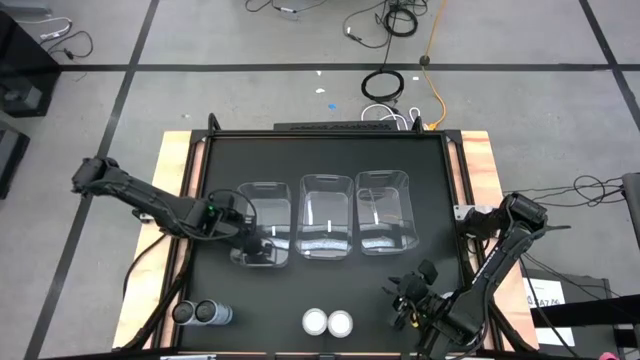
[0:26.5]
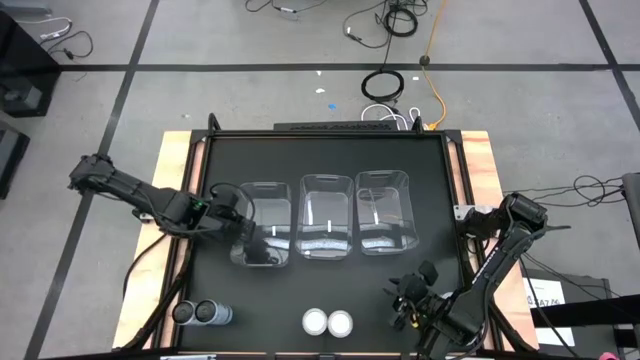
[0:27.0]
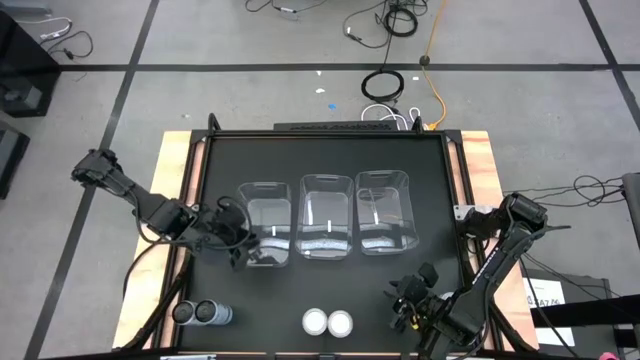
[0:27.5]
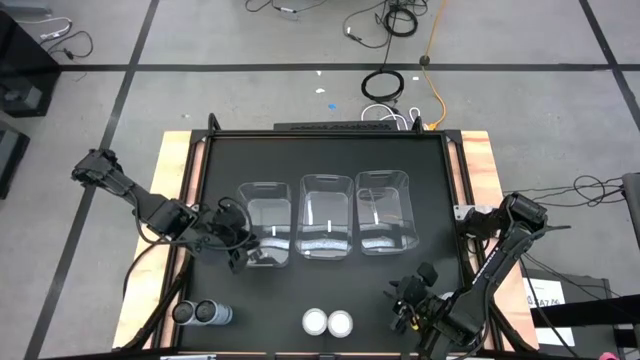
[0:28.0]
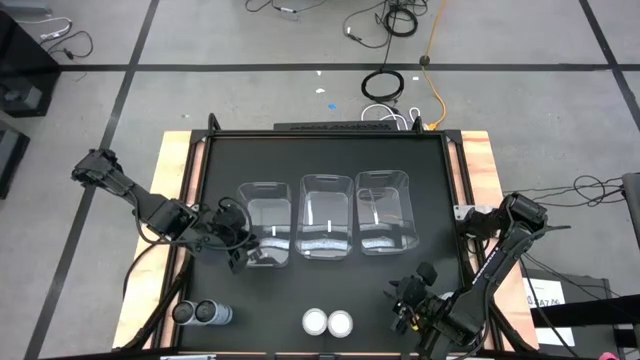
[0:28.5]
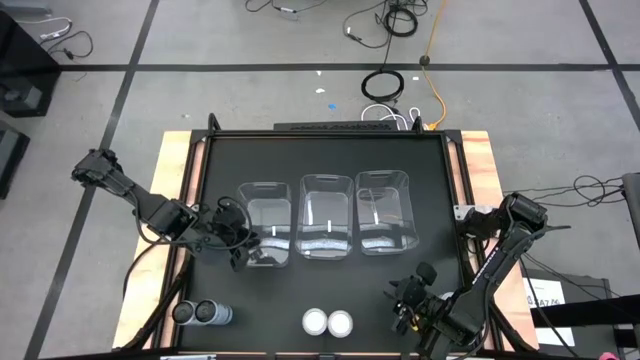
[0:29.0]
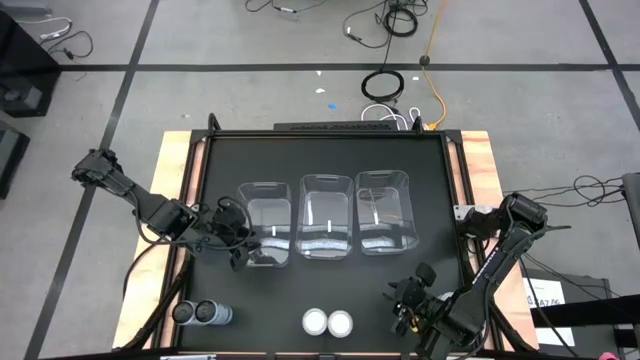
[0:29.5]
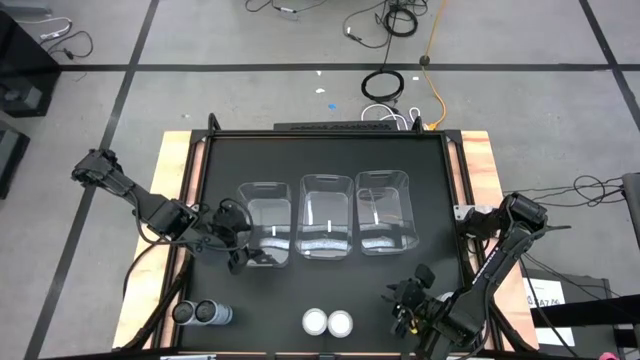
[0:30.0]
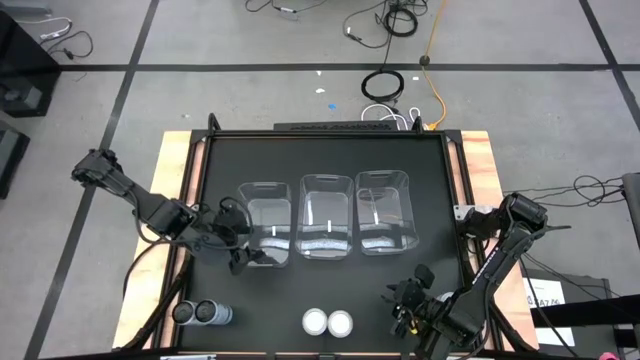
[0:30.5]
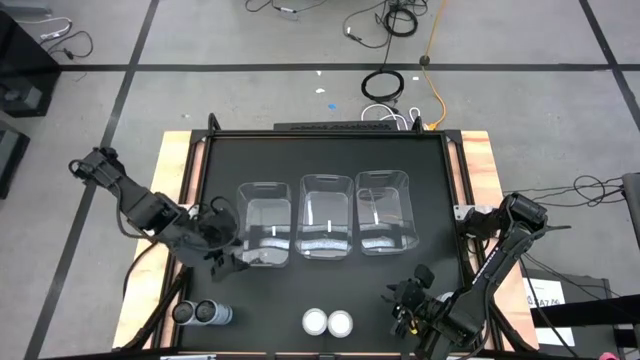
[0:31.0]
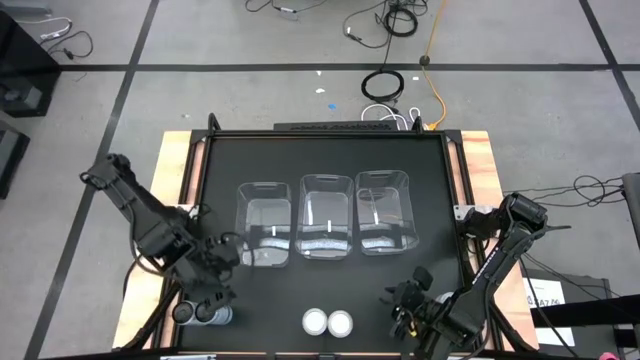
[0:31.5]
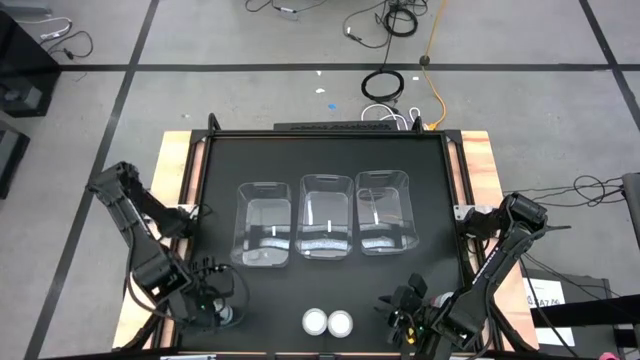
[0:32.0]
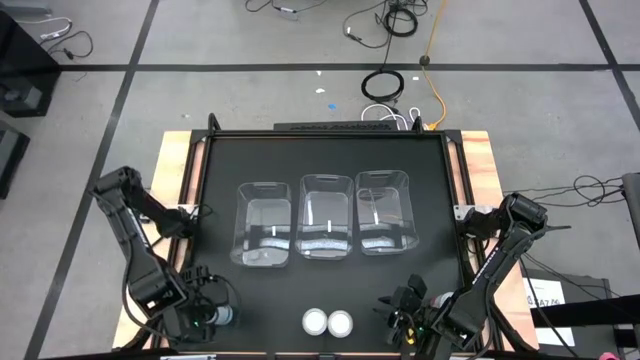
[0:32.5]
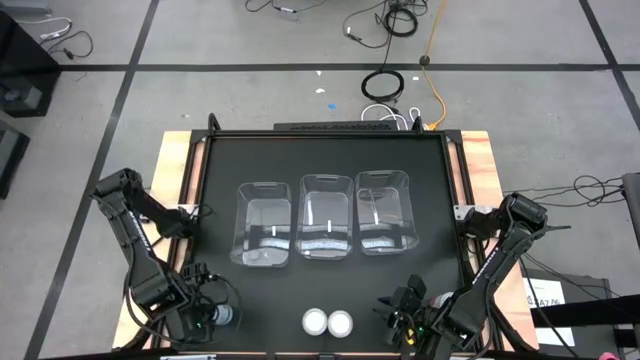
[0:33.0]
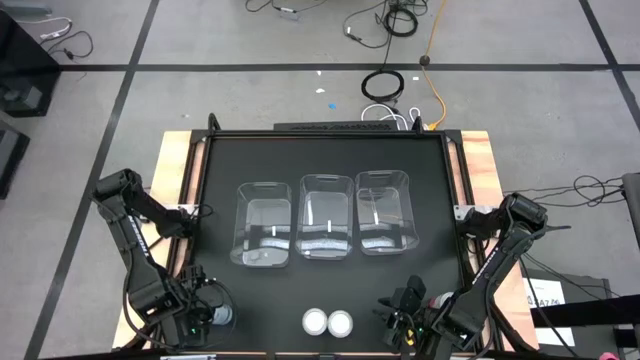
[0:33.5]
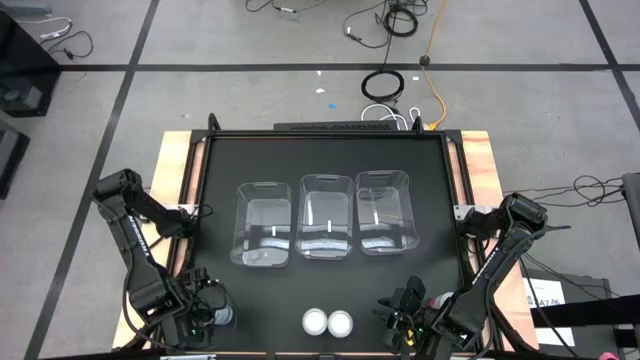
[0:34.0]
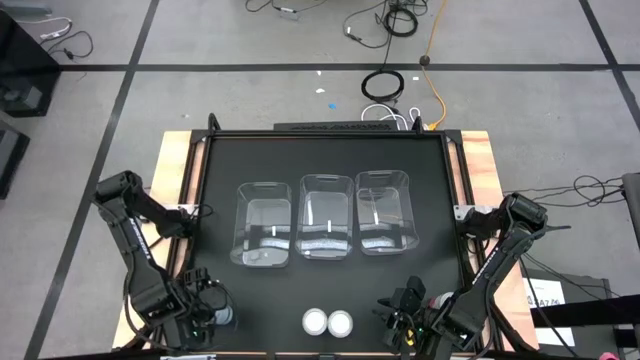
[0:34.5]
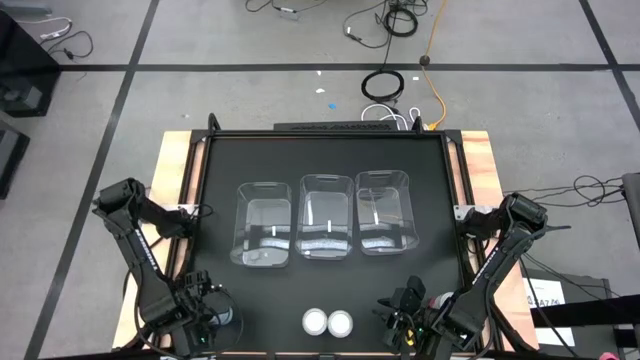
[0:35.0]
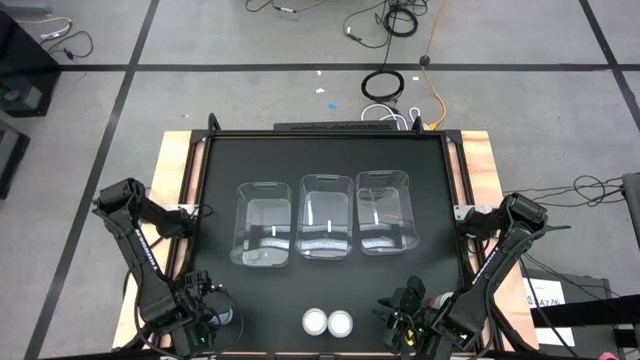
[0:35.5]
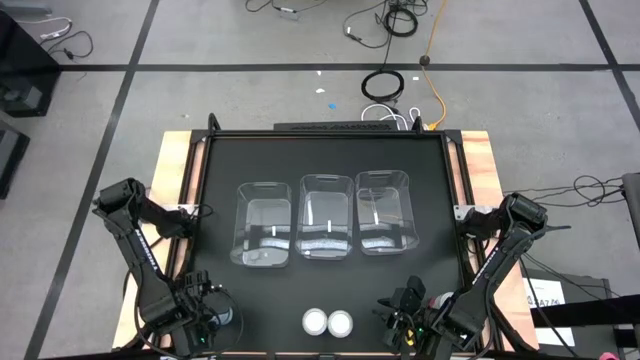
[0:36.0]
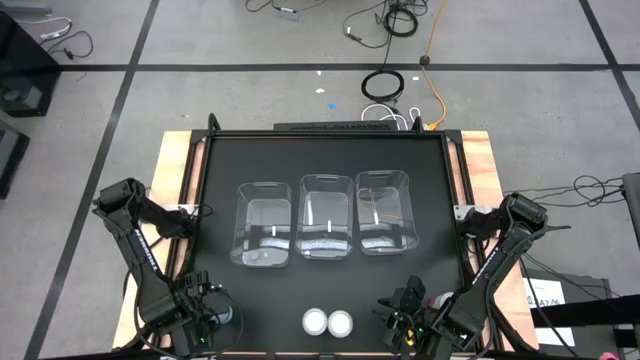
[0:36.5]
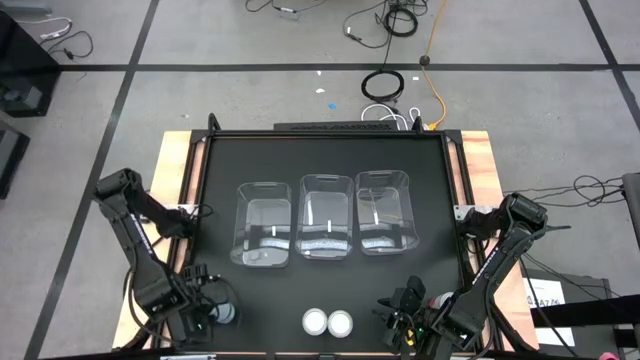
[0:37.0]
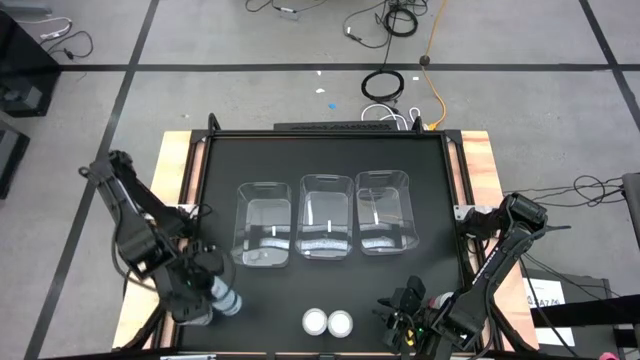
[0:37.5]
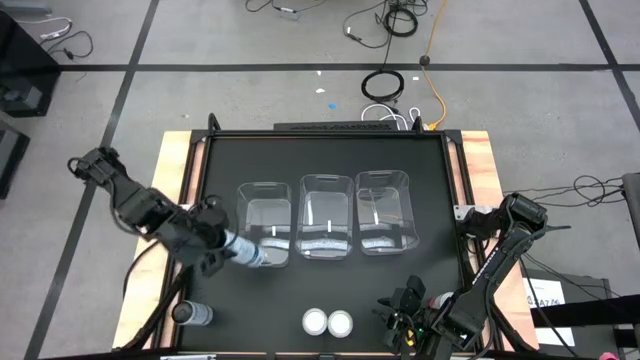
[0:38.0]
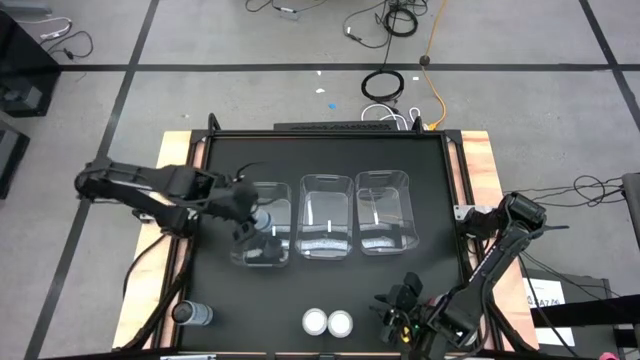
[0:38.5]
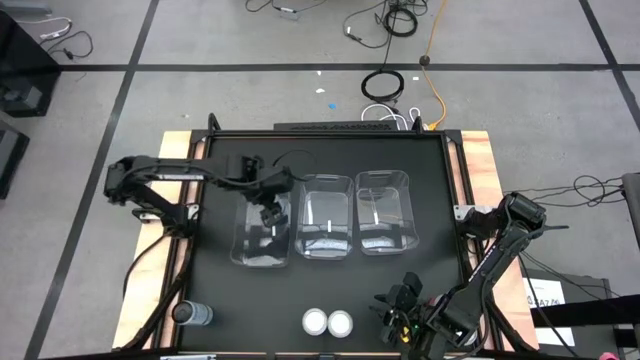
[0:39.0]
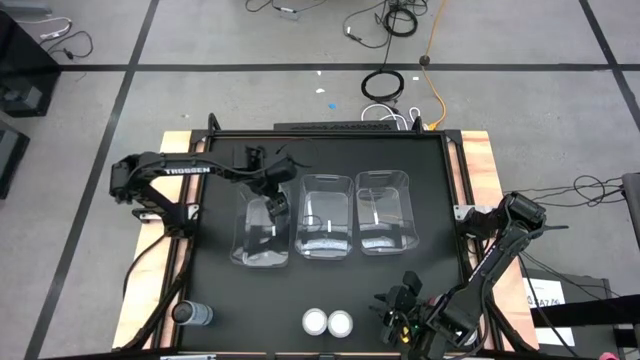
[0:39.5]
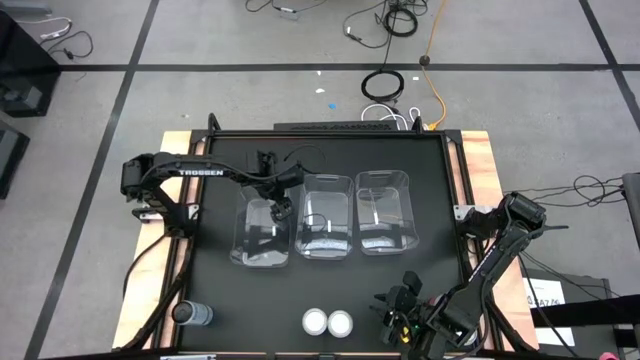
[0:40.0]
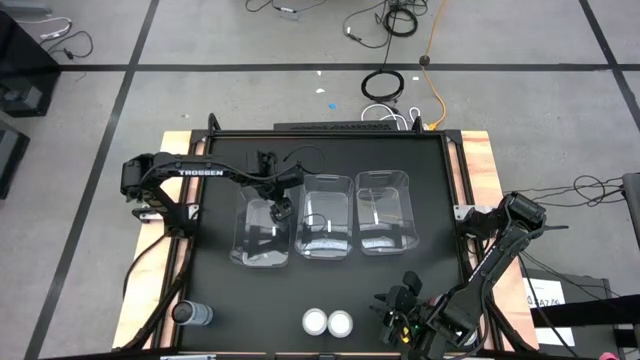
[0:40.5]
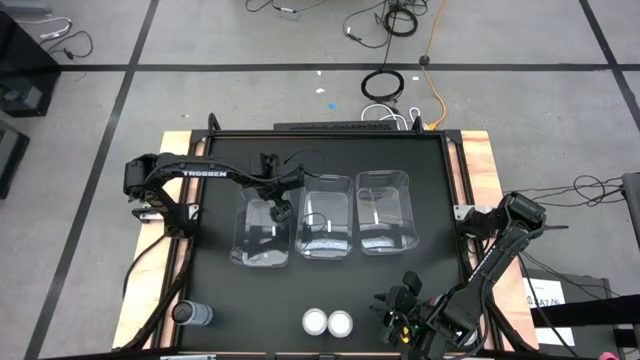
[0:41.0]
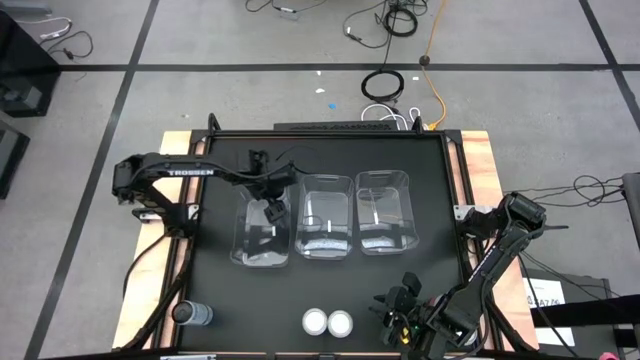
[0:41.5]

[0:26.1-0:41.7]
Task: Sort soda cans
Put the right white soda can into the left transparent bin

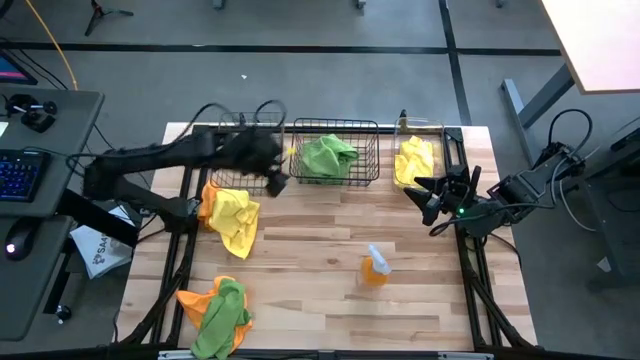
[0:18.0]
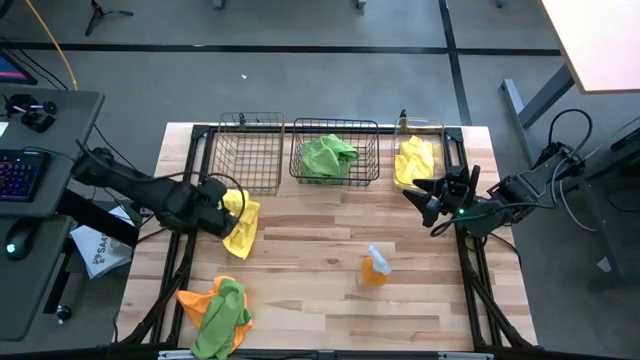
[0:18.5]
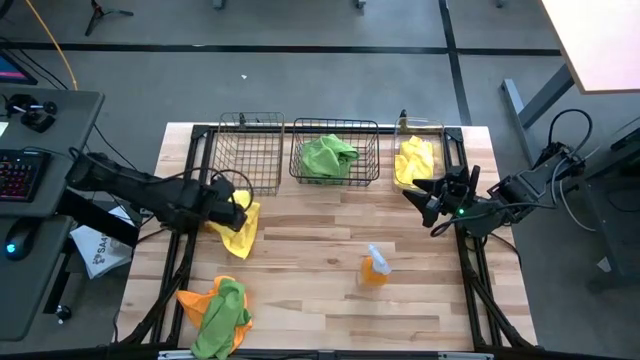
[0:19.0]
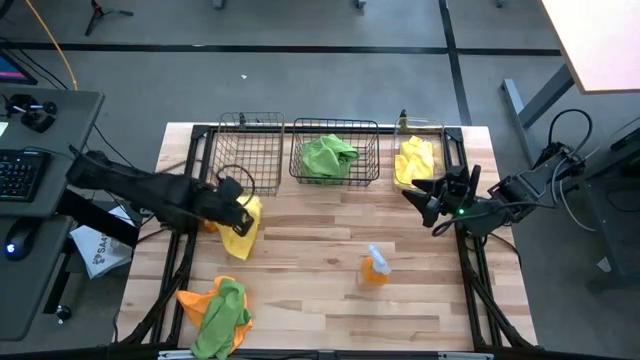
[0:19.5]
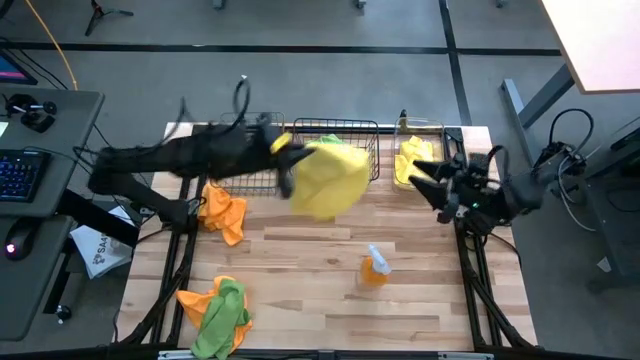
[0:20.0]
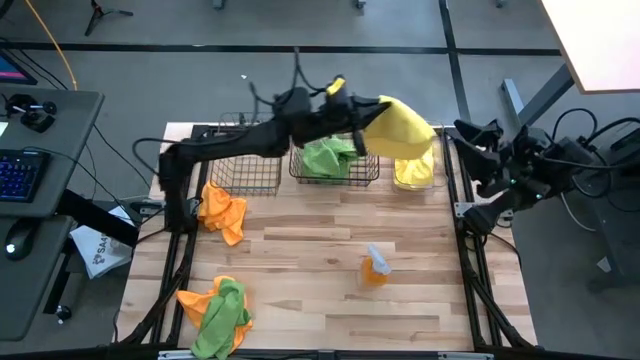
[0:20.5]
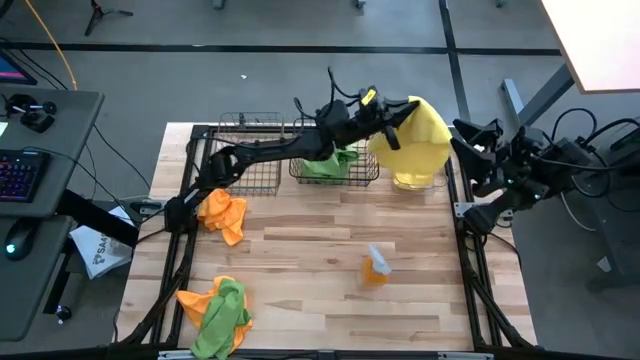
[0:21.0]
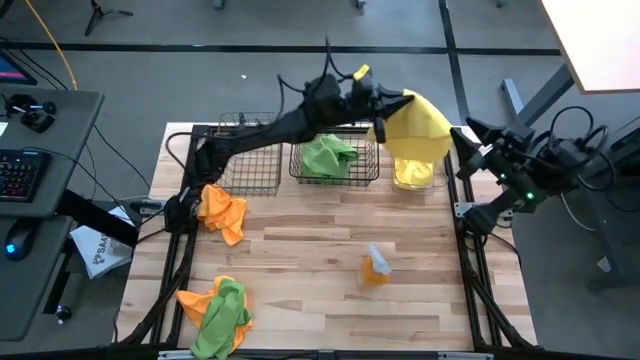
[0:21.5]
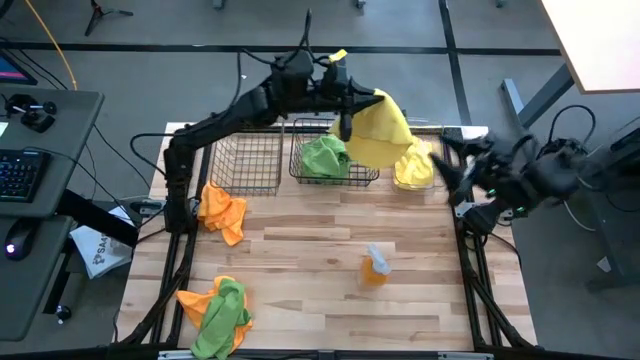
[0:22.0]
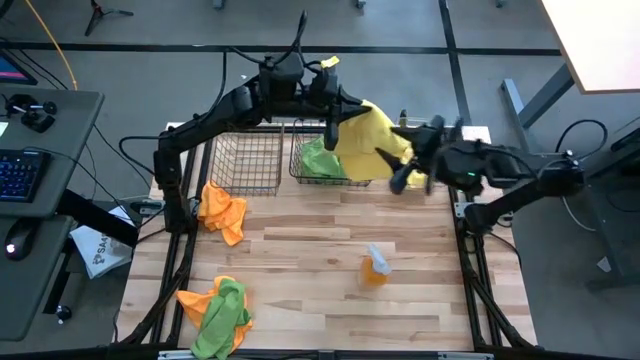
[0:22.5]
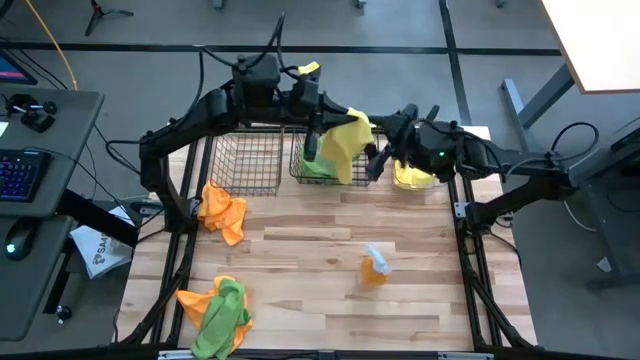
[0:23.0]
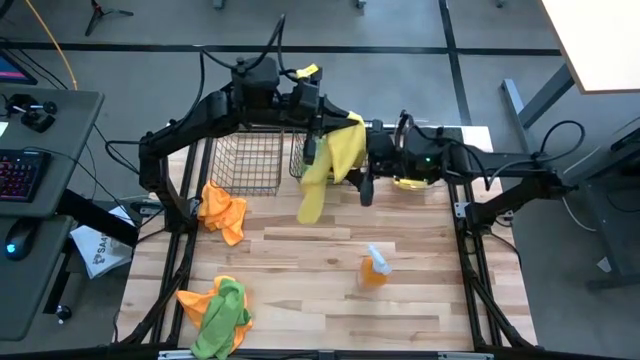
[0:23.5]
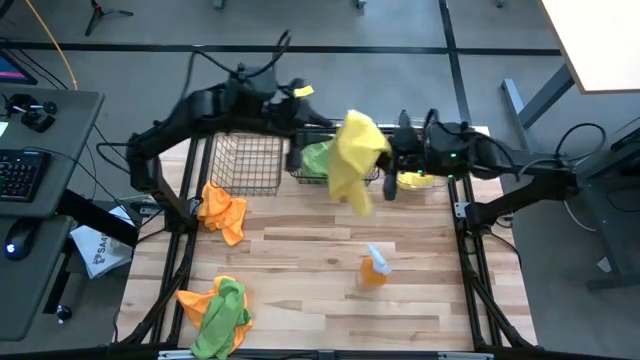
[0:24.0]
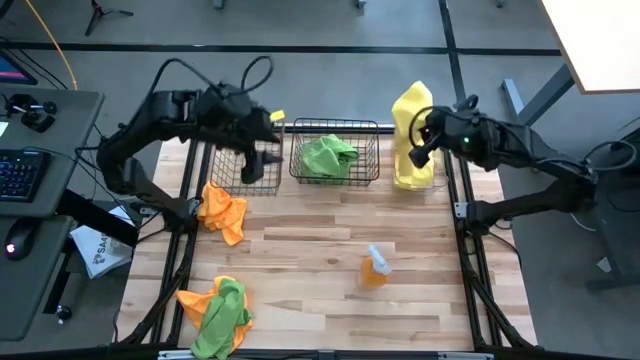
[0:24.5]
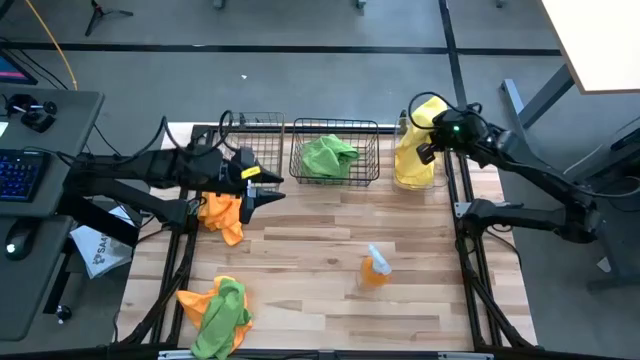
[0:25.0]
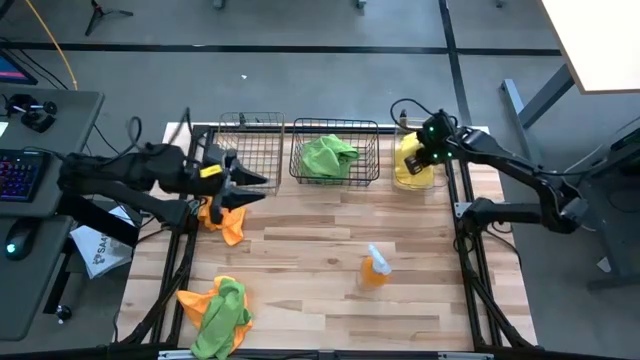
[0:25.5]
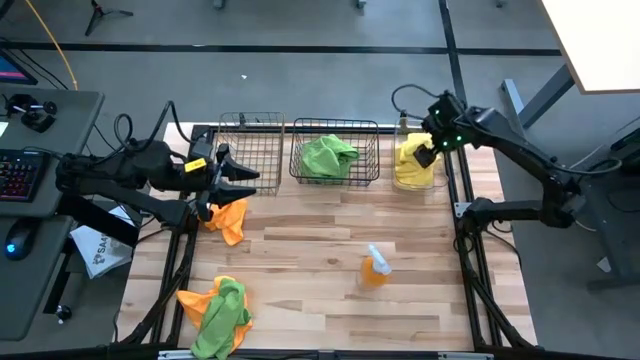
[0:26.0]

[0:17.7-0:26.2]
Task: Sort microfiber towel by color & place in baskets
Put the yellow microfiber towel into the transparent bin
